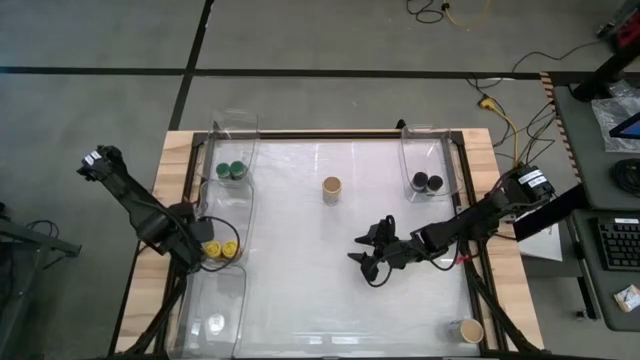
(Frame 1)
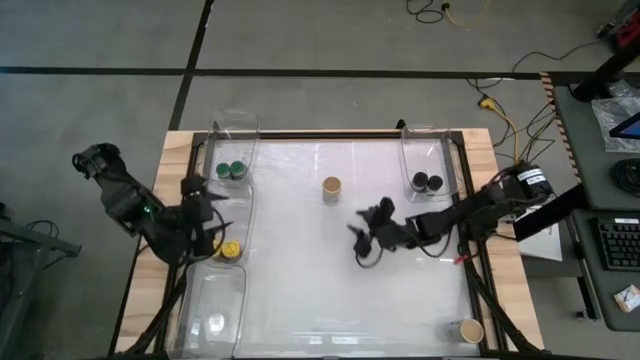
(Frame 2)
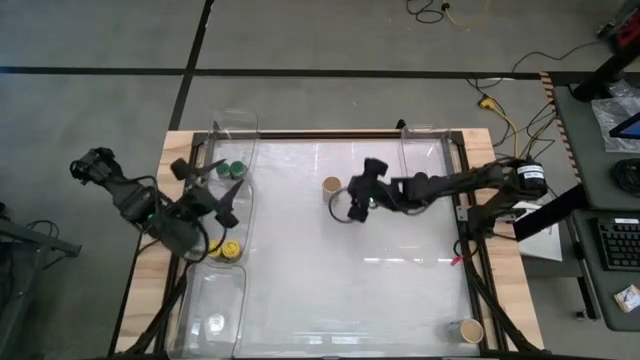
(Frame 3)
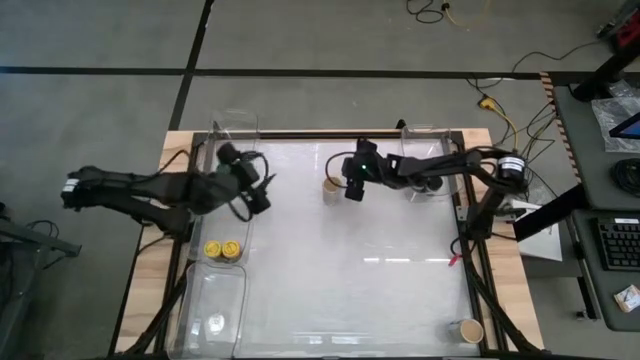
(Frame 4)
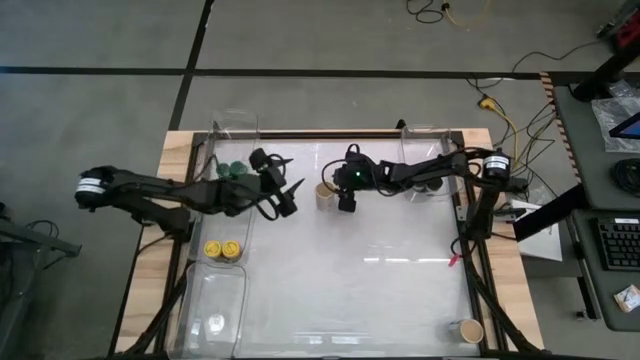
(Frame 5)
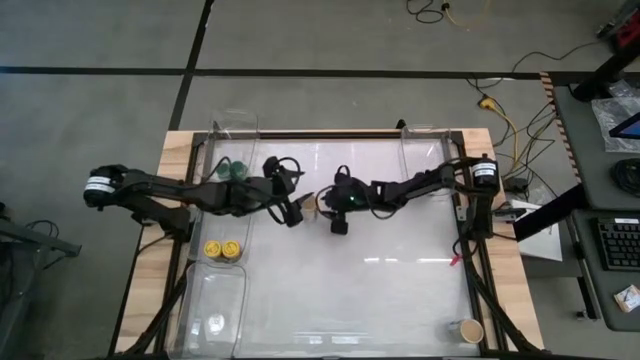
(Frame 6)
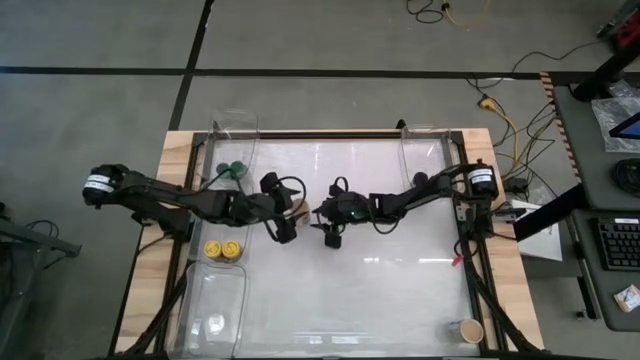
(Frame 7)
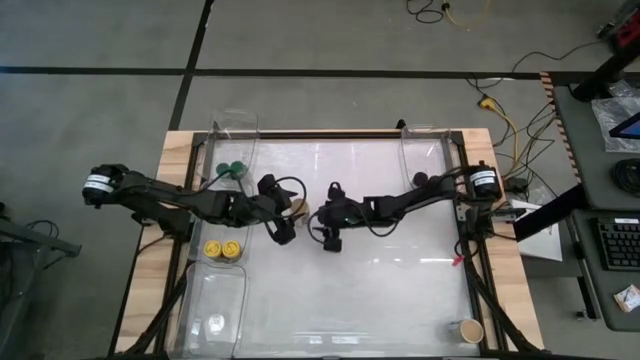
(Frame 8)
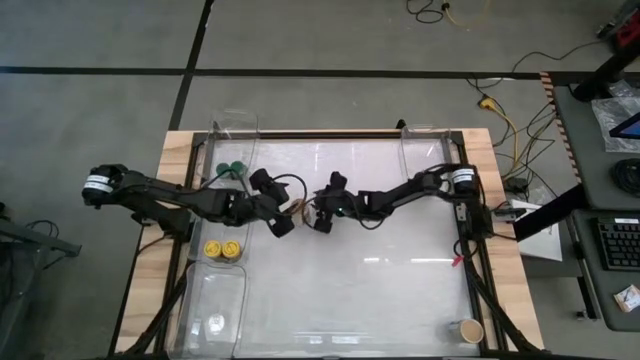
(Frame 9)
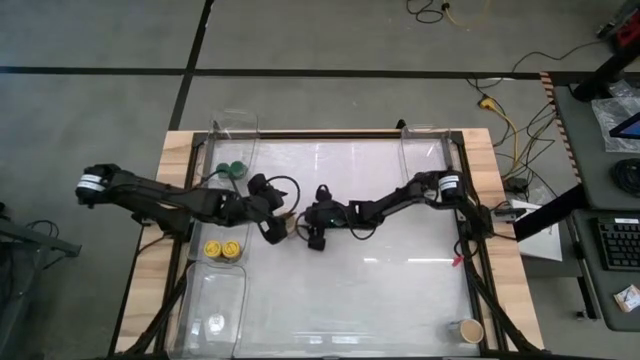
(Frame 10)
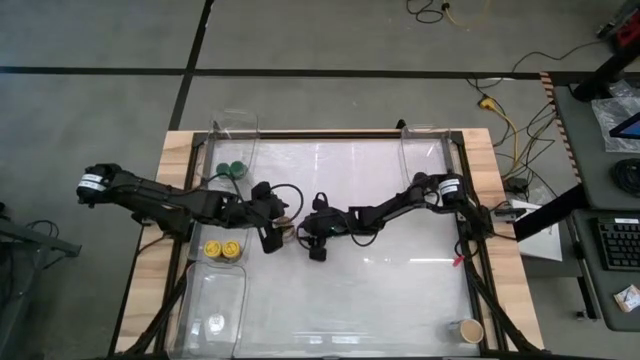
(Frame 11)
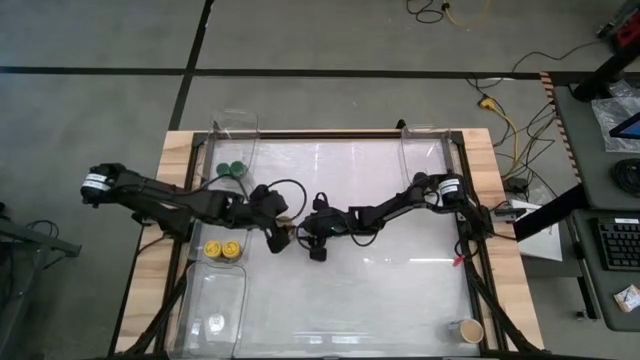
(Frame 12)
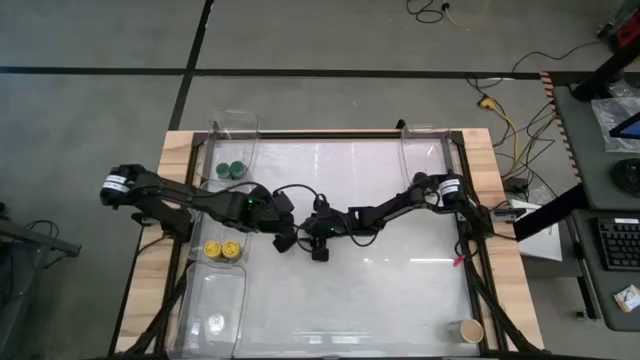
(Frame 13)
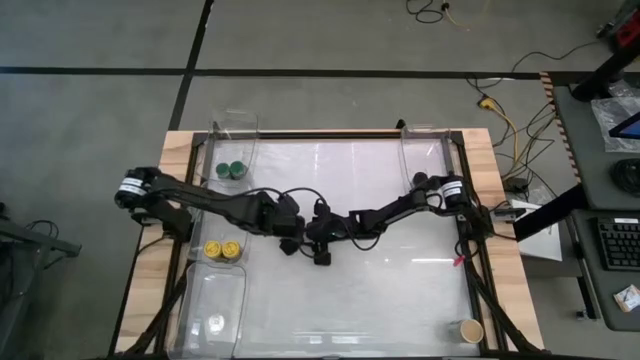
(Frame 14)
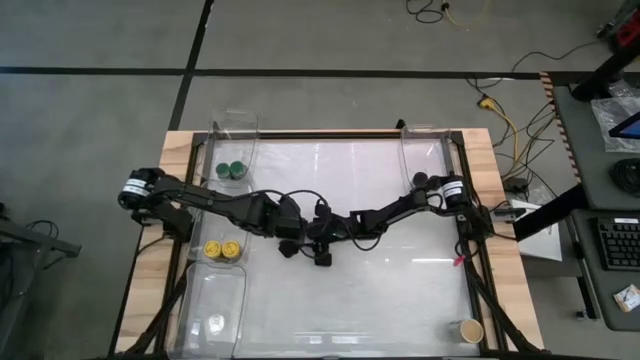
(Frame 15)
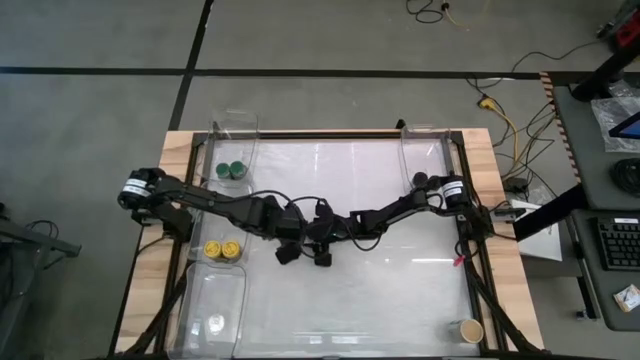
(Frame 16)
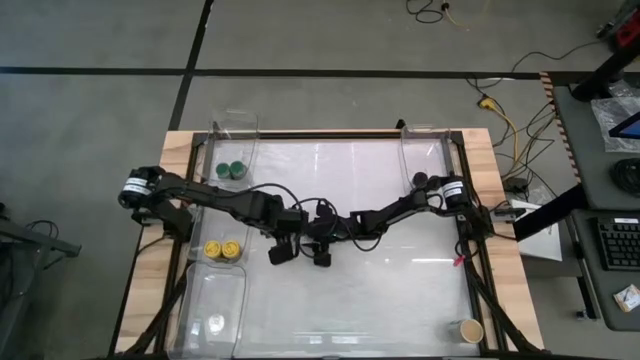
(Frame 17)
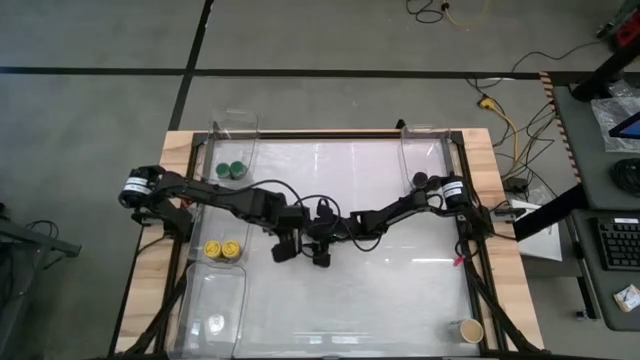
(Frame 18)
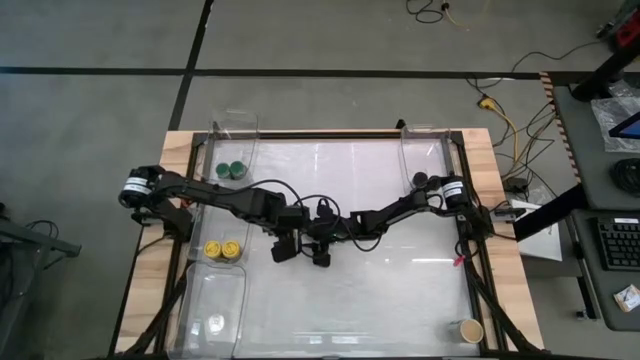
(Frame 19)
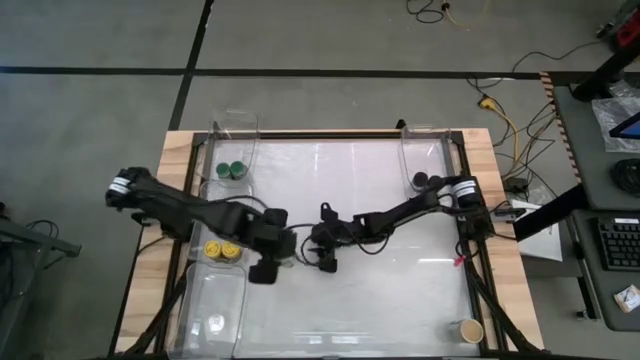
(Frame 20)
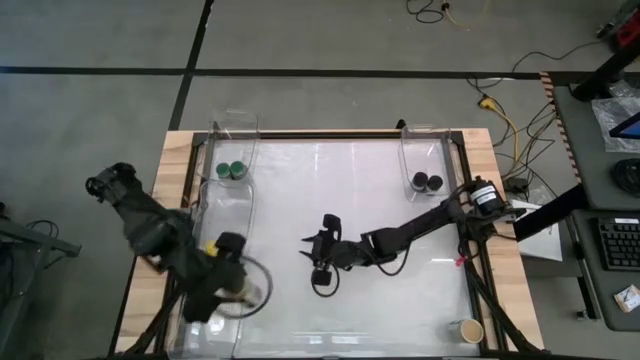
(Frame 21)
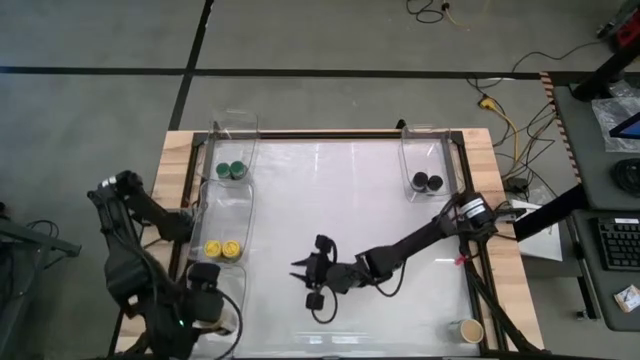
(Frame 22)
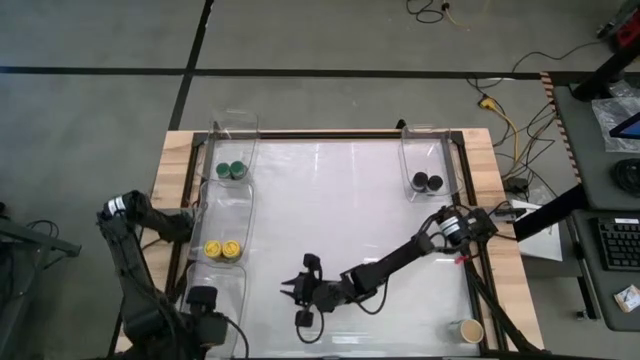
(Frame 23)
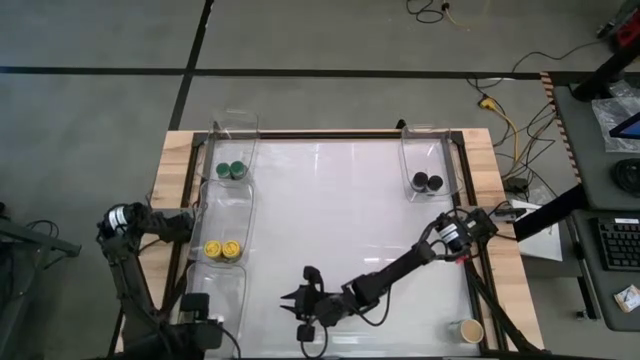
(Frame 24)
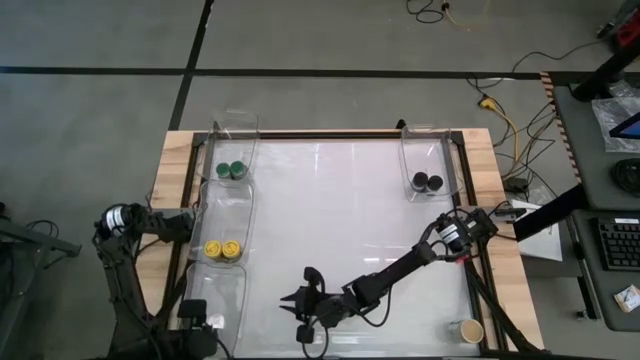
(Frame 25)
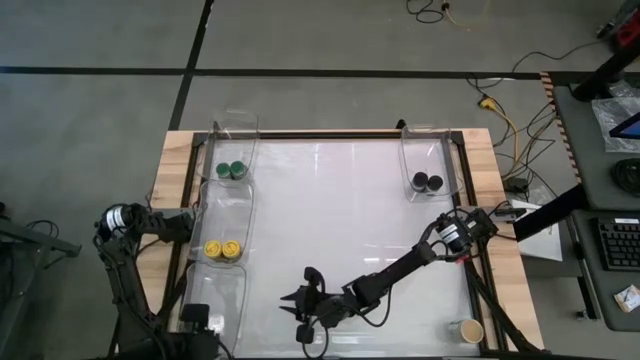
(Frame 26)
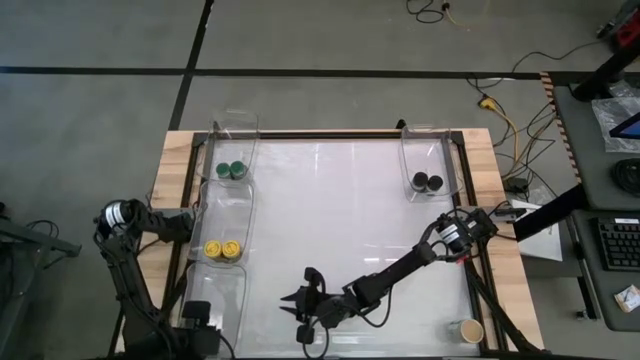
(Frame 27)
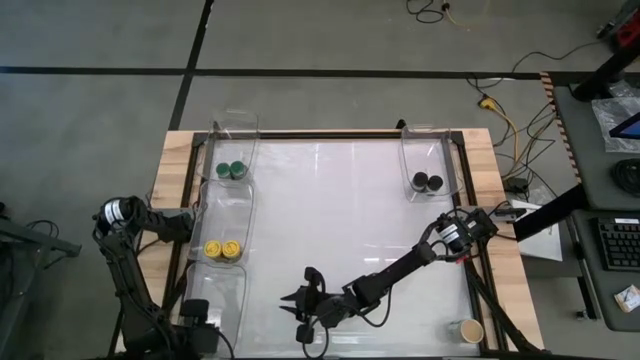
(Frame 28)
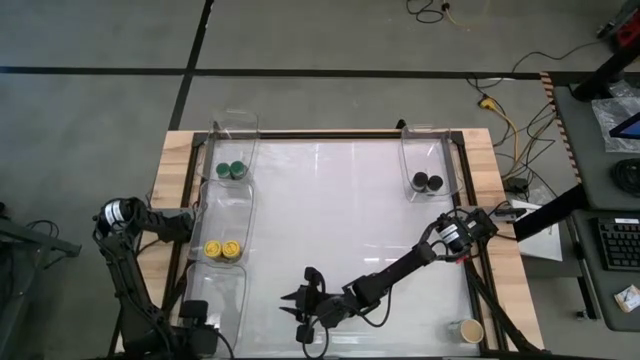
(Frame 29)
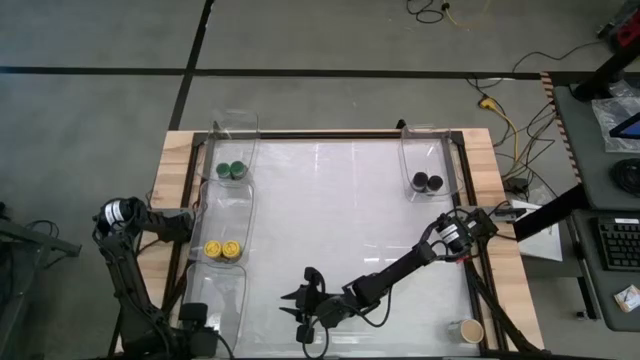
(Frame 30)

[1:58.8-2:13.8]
Task: Sort spices by type
Move the top brown spice bottle a few centimeters to be taken by the other gripper

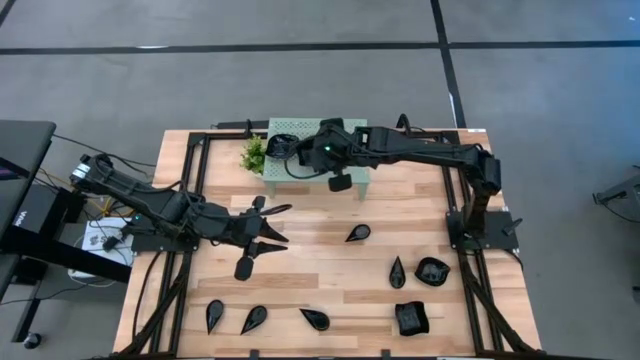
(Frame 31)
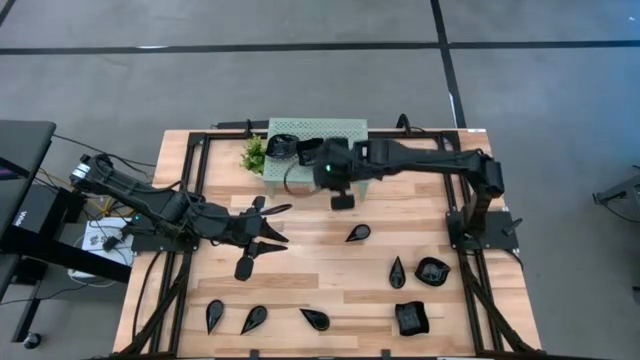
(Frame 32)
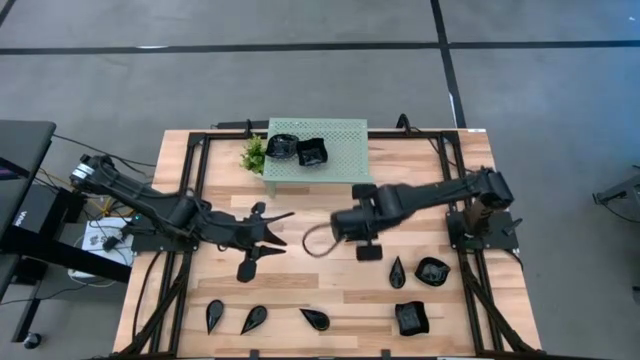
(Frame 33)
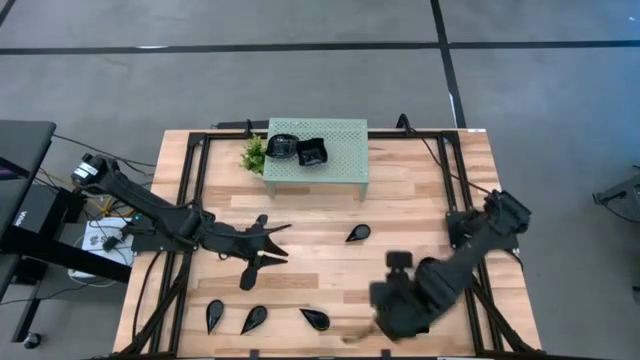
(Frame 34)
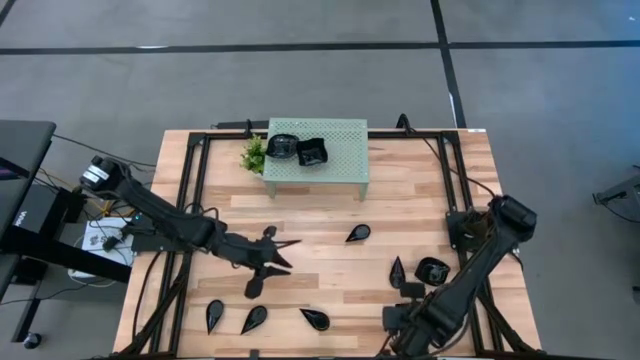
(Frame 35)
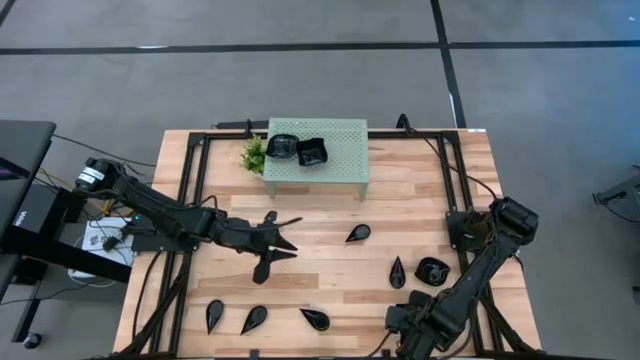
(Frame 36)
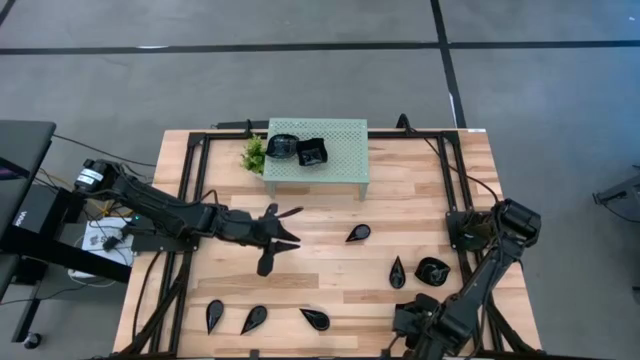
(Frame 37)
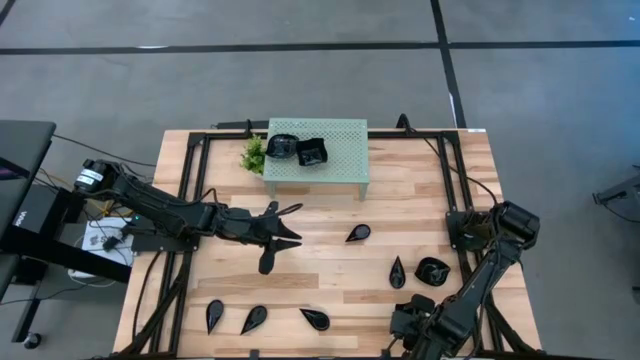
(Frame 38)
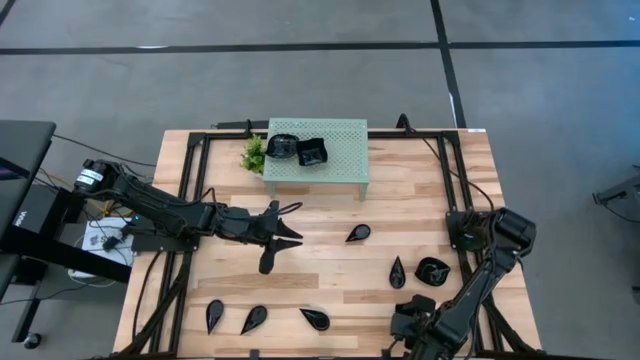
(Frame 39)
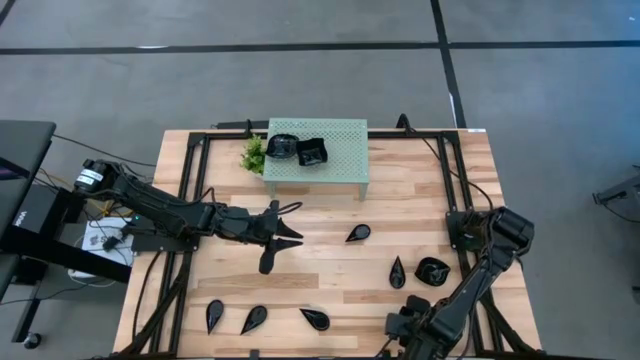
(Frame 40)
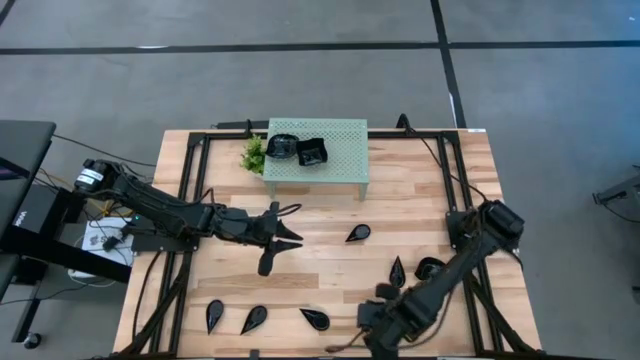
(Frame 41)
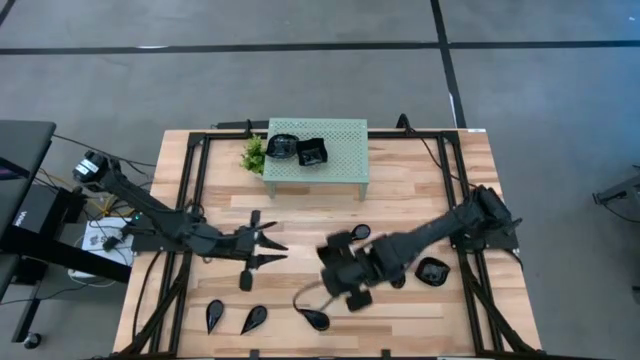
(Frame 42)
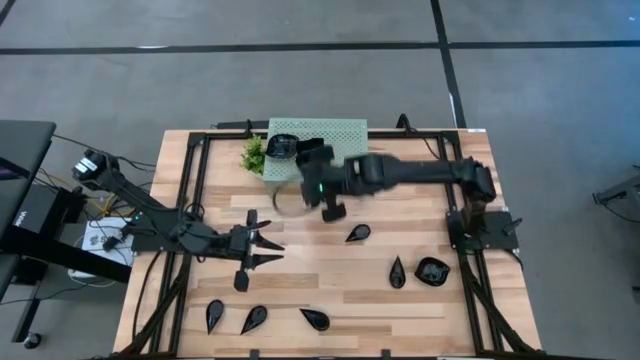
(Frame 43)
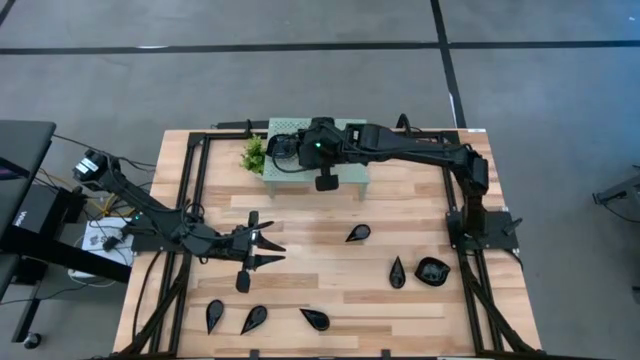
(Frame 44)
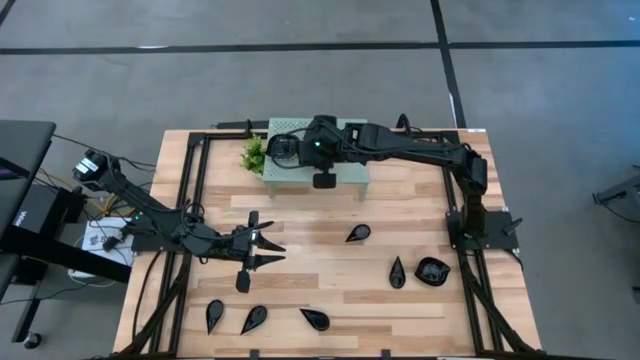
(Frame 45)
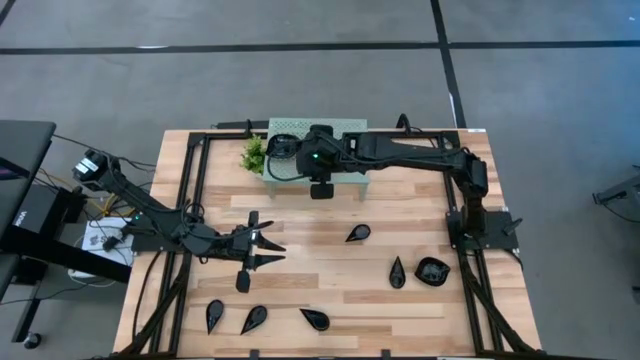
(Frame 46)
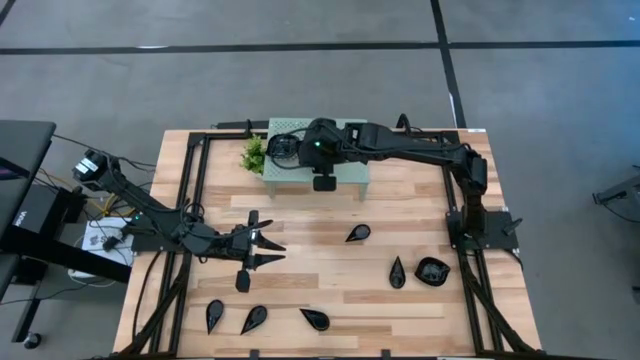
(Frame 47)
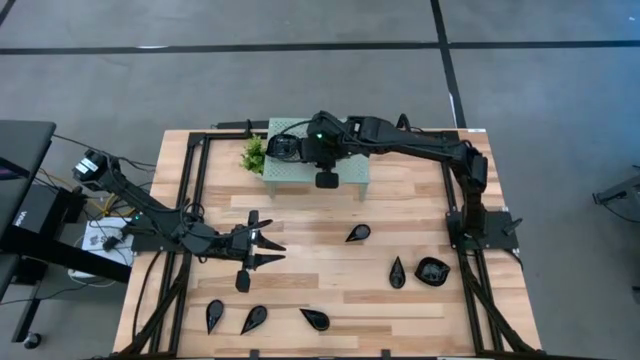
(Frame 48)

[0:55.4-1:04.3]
Task: Pick & Place Mini shaped plates
Stack the distorted square plate on top of the other distorted square plates on the shelf
